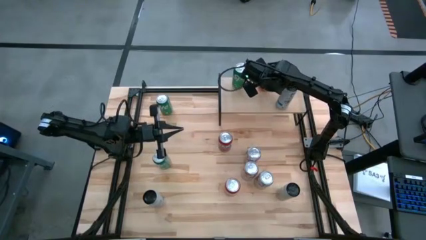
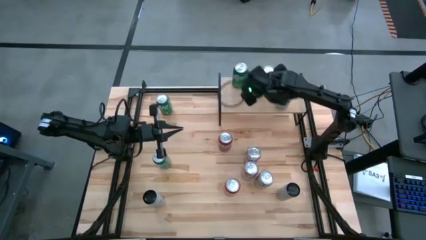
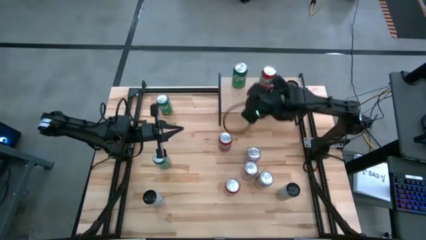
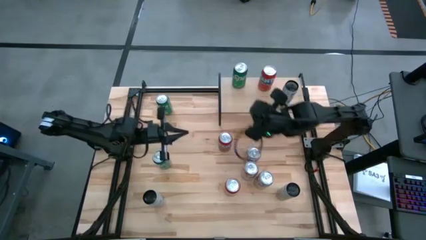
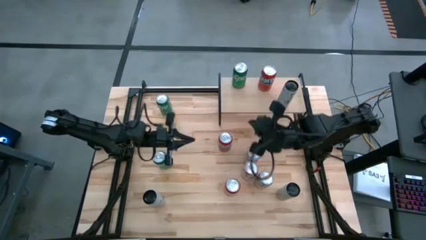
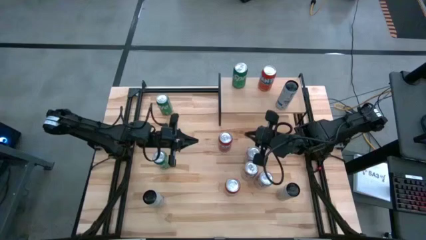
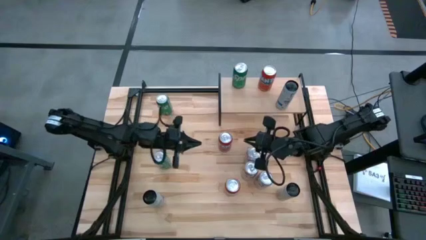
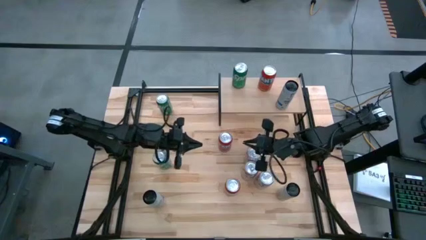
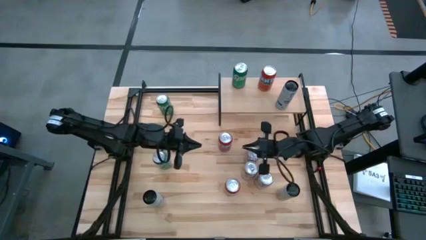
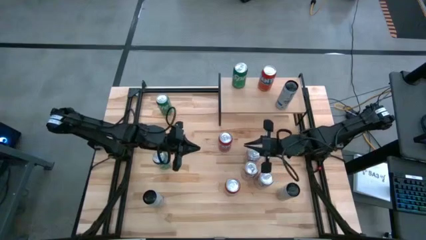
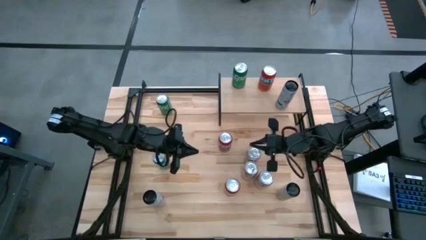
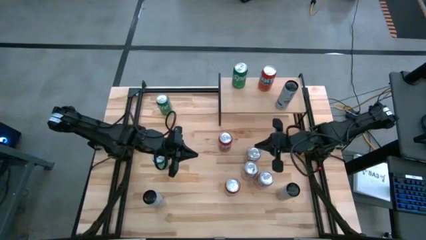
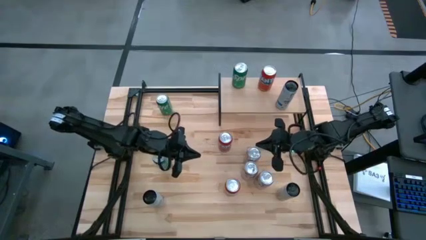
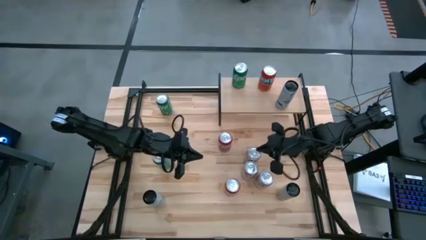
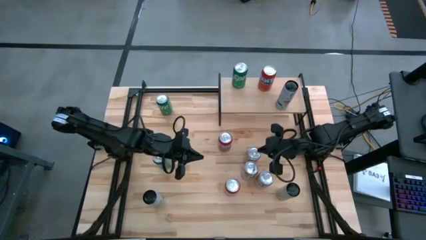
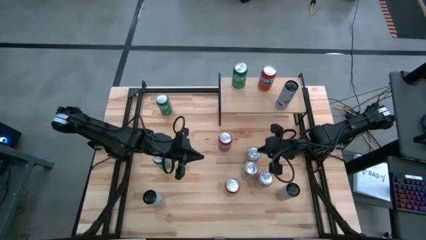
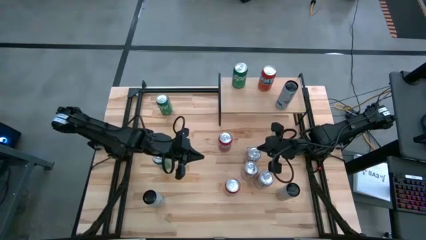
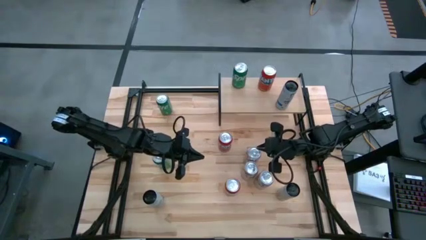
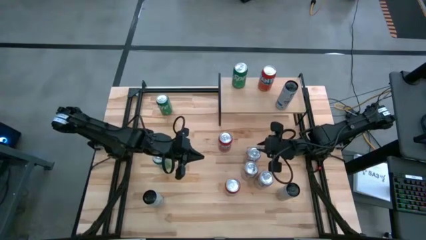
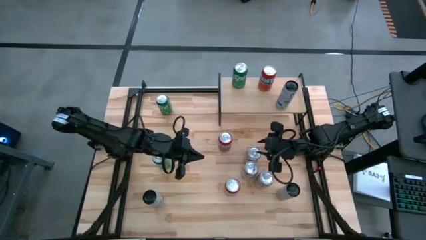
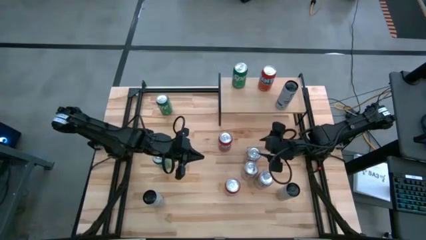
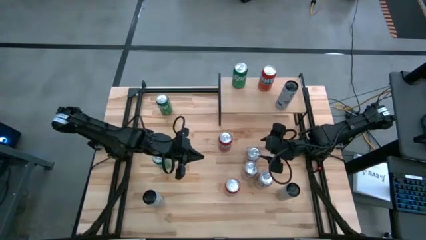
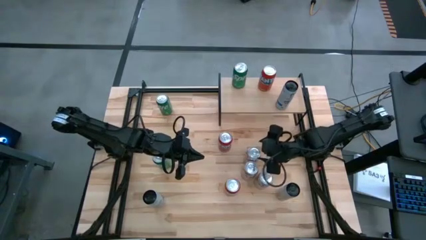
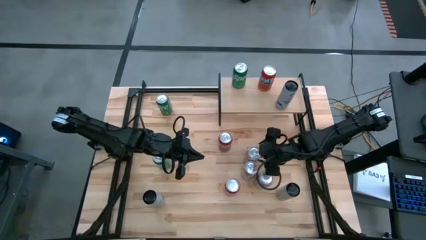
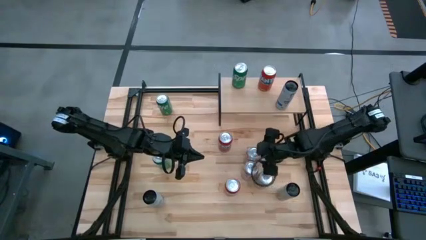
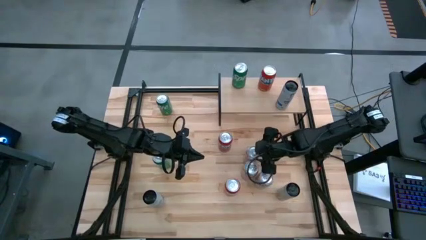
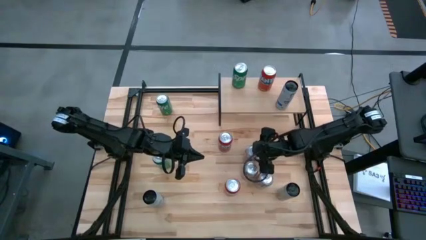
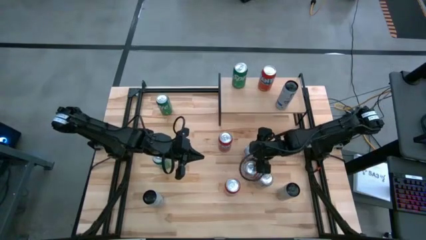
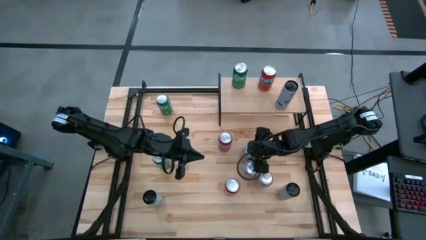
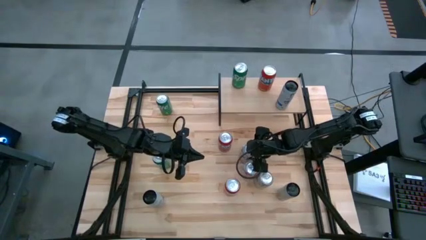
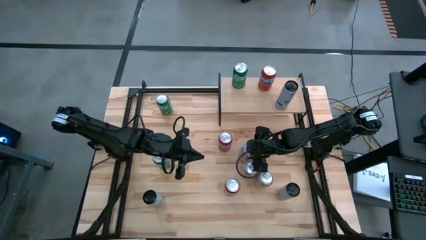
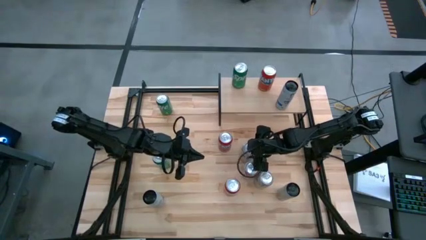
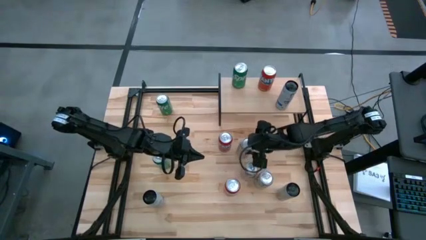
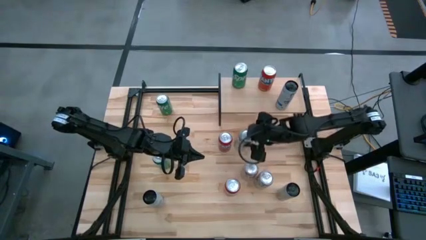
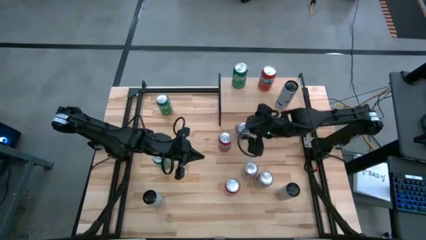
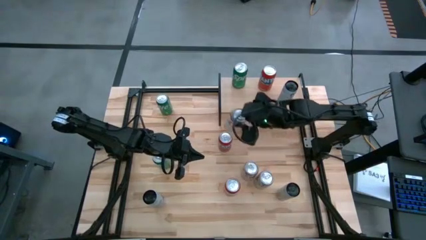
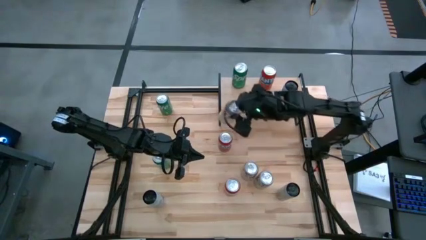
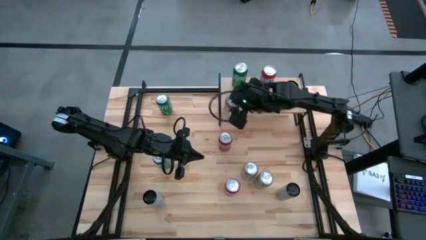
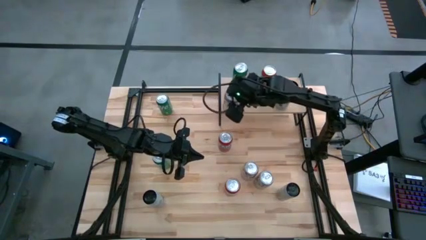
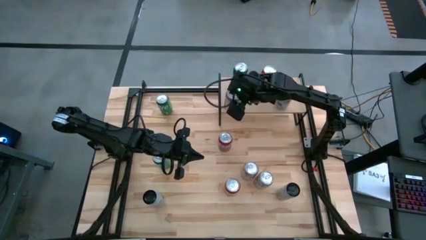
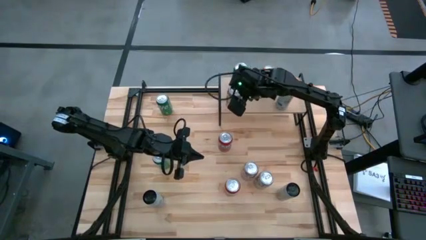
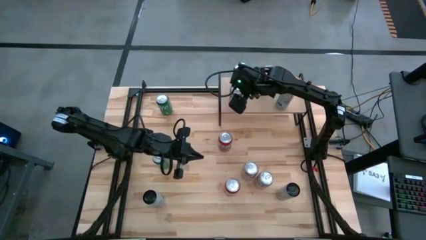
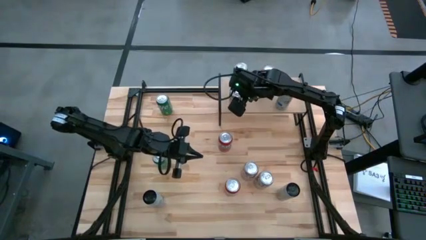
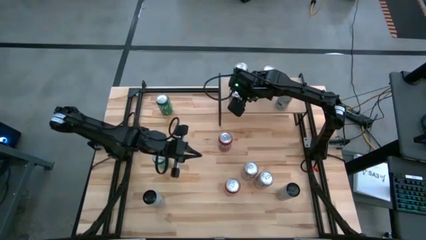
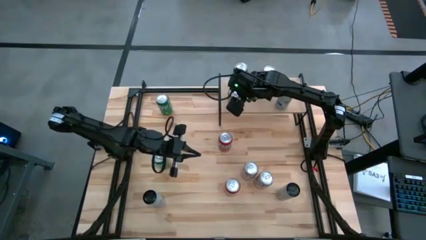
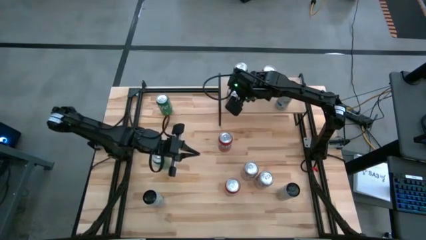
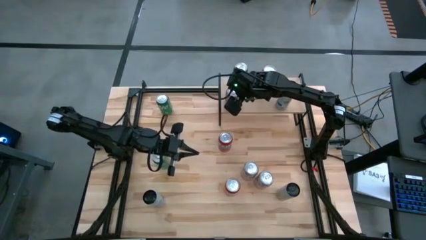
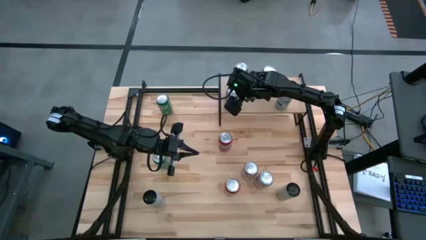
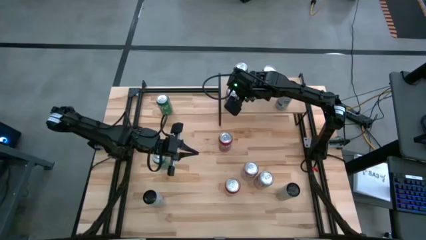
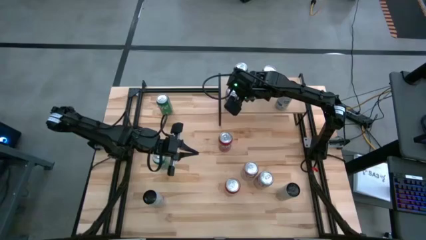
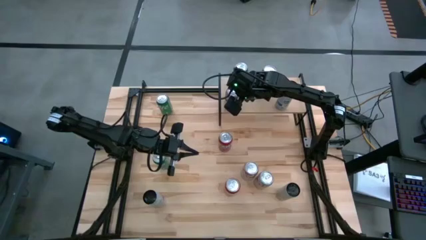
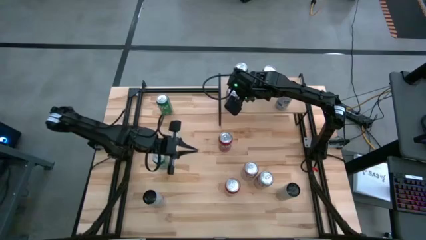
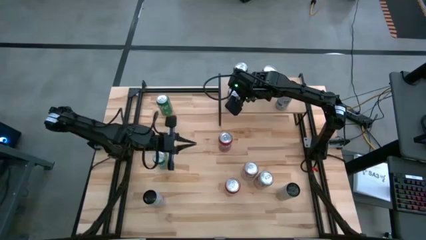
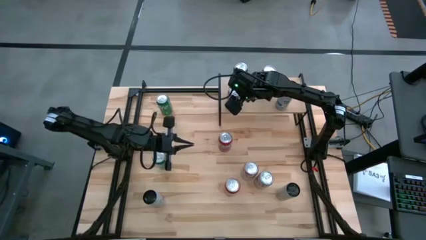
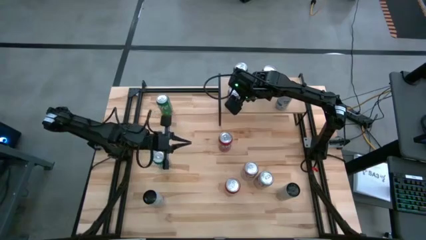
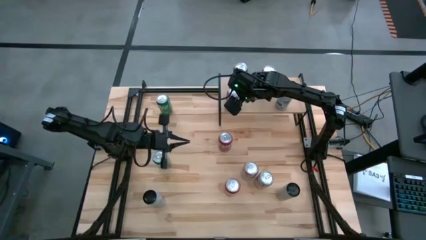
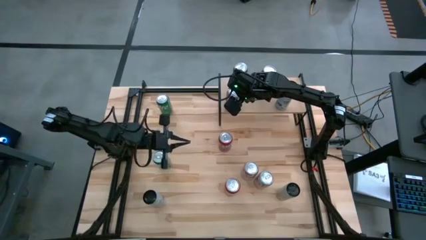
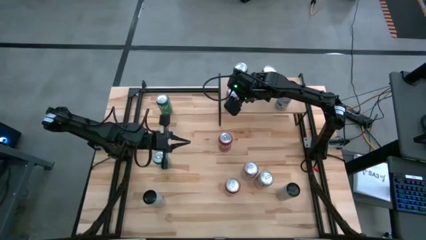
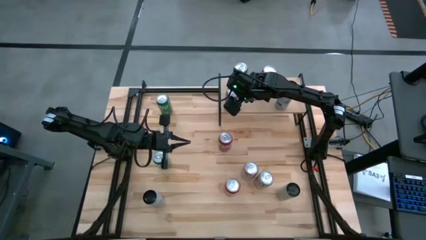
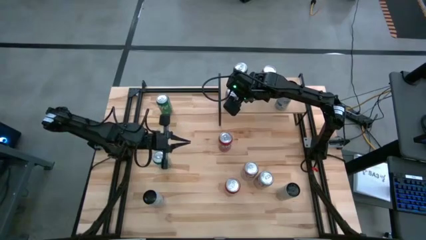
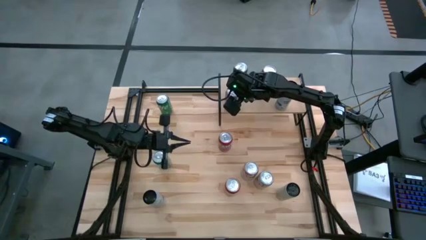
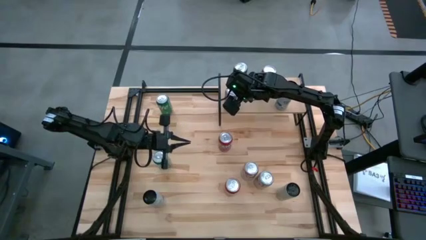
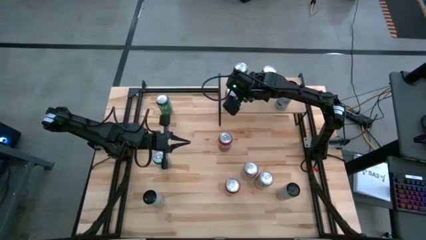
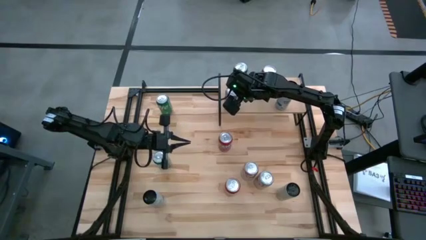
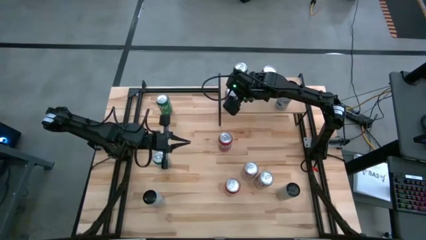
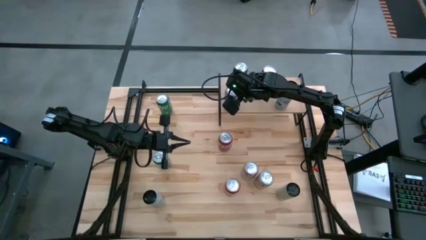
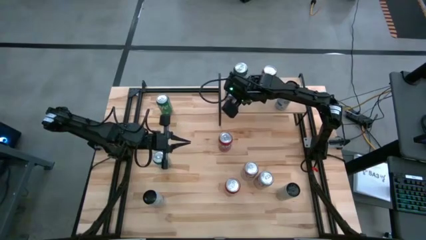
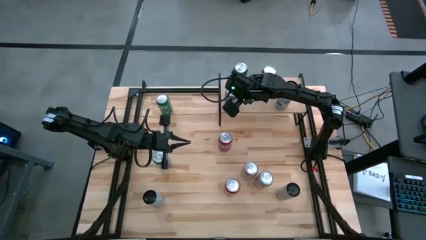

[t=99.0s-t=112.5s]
Task: Place canned beverage on shelf
Put the top silver soda can on the shelf

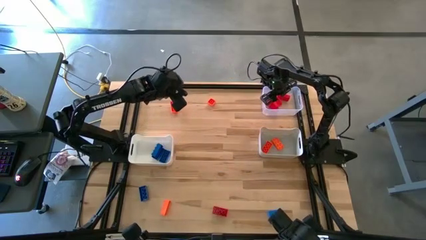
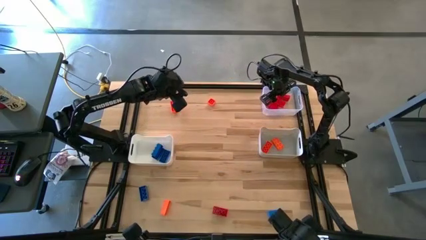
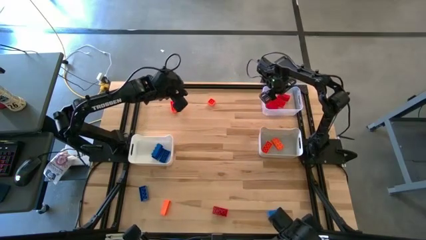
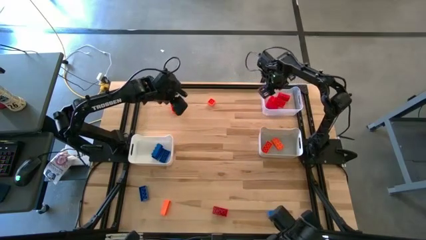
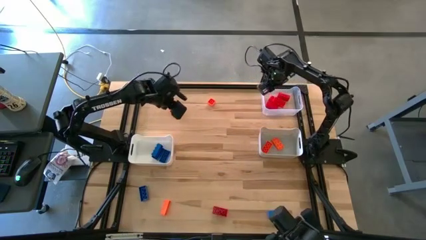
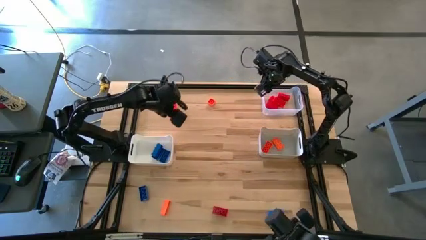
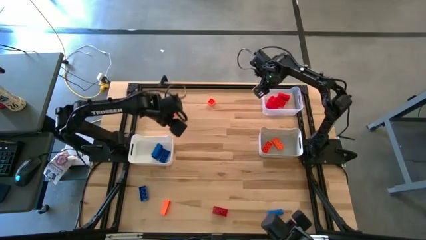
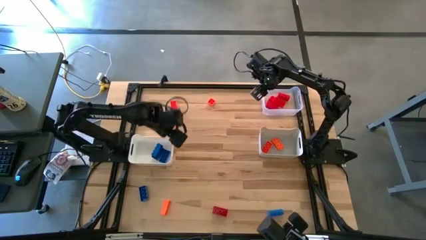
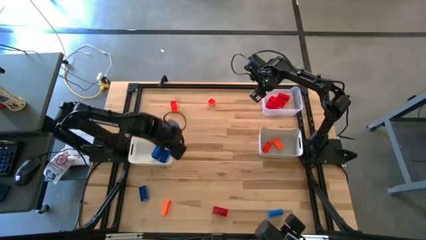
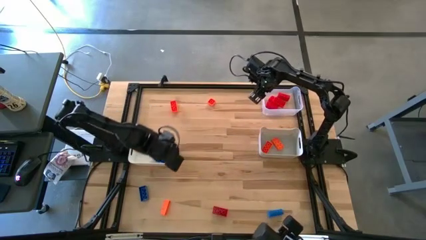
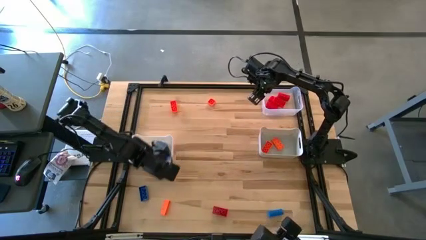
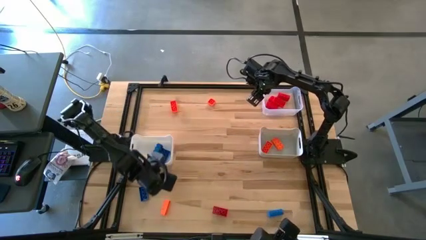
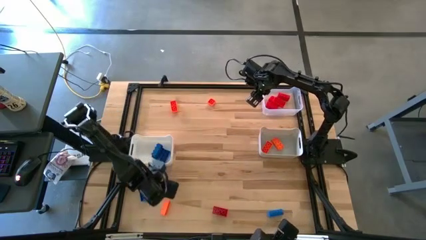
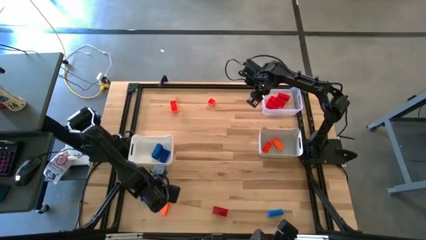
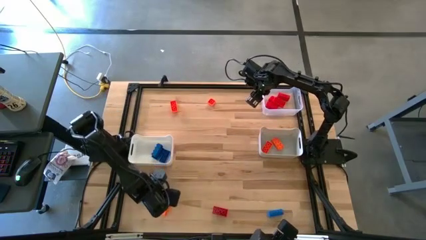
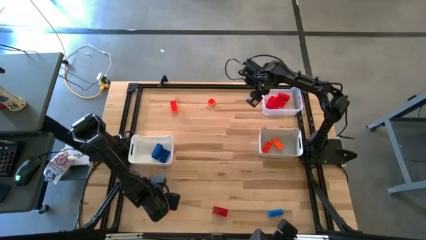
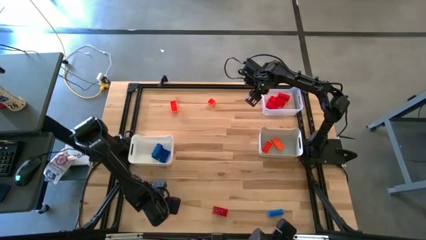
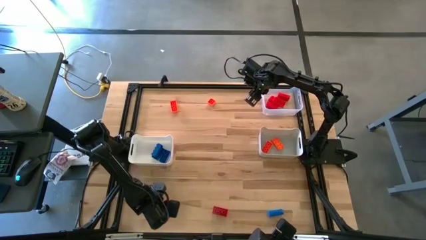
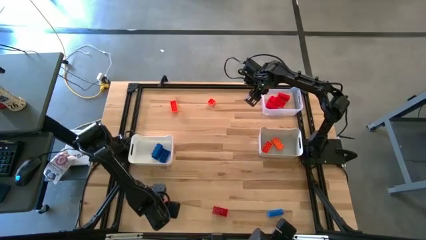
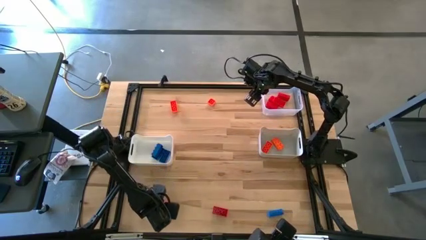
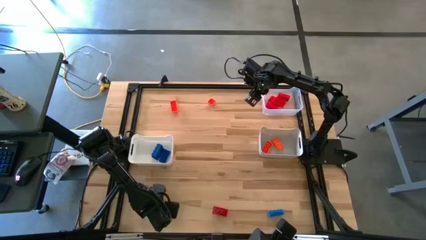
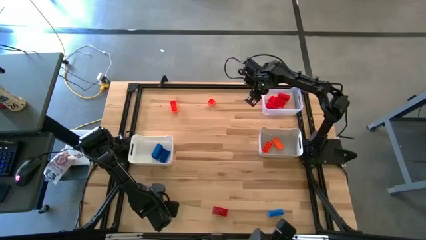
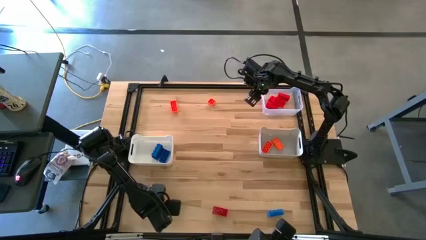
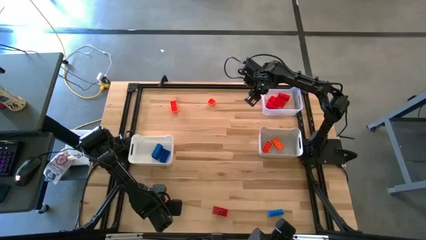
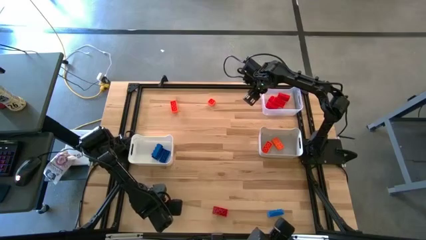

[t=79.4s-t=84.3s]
Task: Sort & place blocks by color
Put the orange game piece into the gray bin
